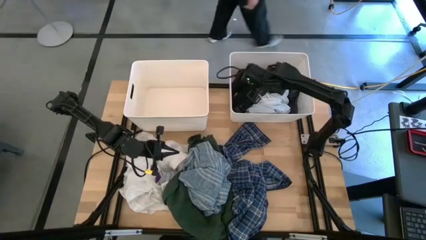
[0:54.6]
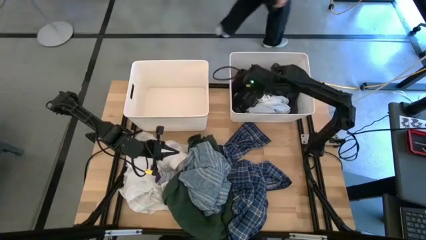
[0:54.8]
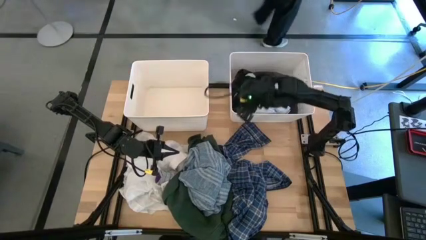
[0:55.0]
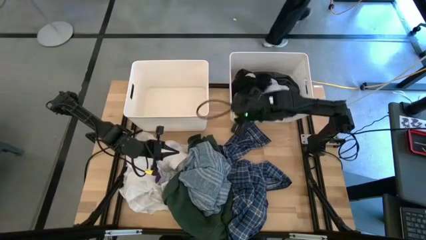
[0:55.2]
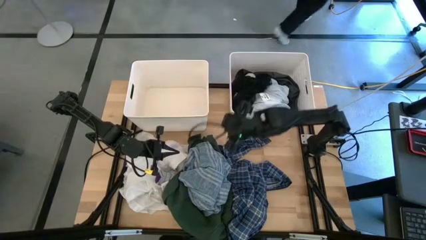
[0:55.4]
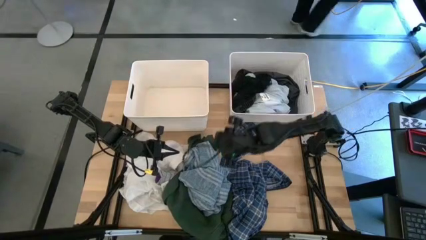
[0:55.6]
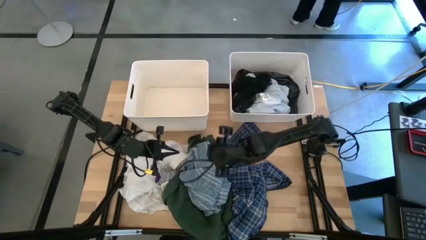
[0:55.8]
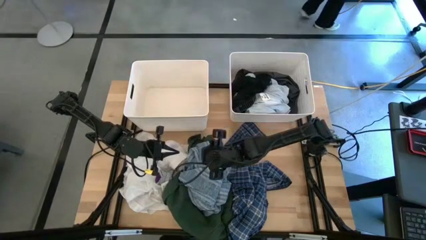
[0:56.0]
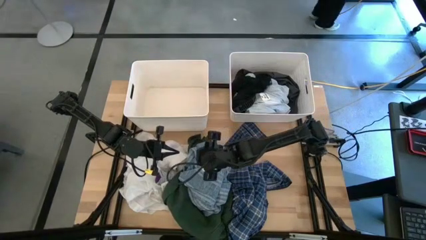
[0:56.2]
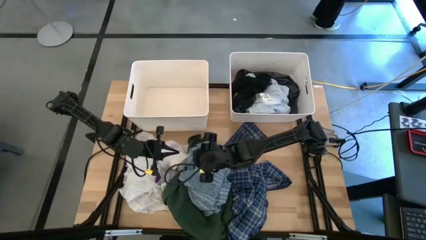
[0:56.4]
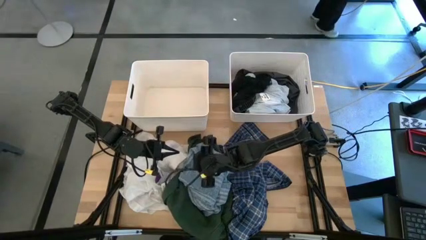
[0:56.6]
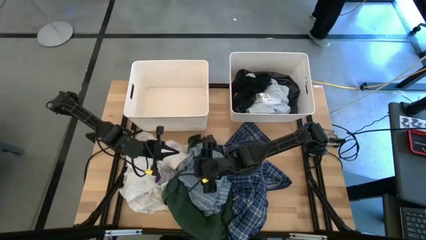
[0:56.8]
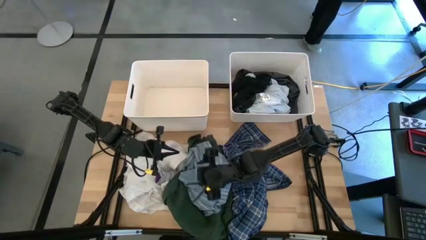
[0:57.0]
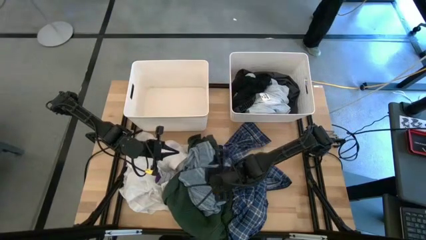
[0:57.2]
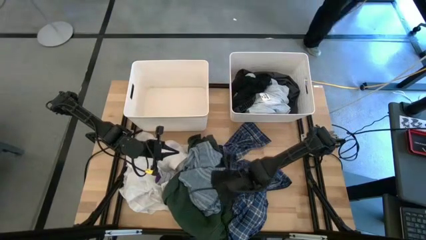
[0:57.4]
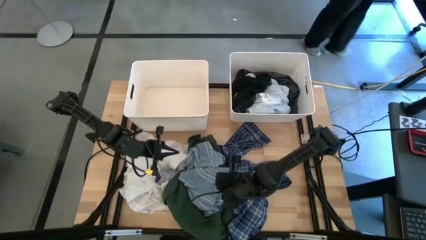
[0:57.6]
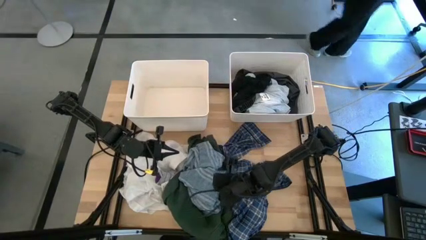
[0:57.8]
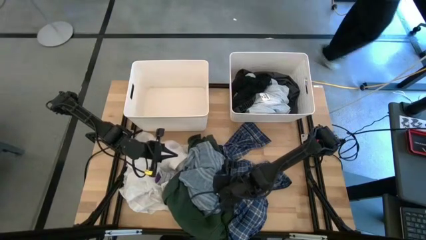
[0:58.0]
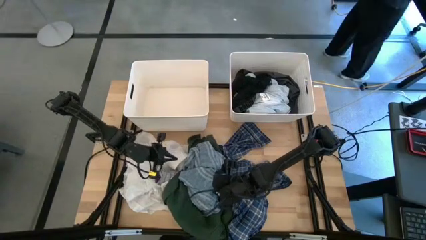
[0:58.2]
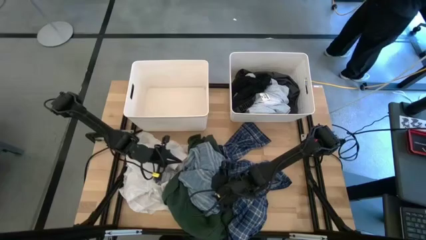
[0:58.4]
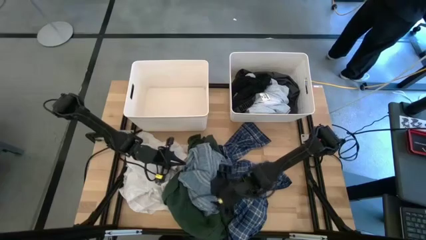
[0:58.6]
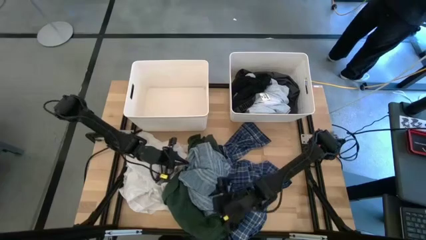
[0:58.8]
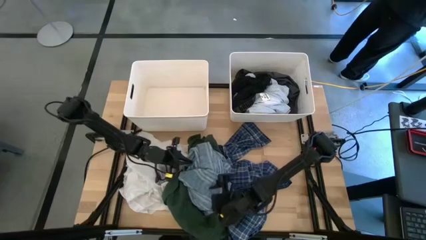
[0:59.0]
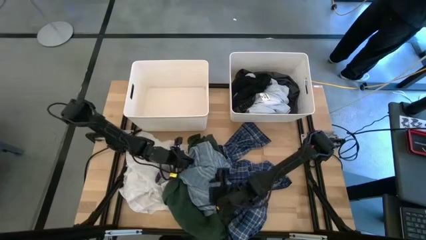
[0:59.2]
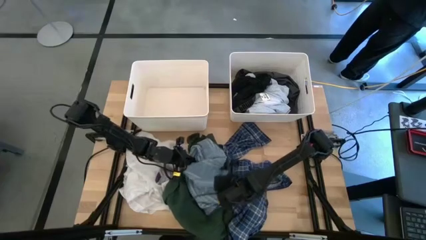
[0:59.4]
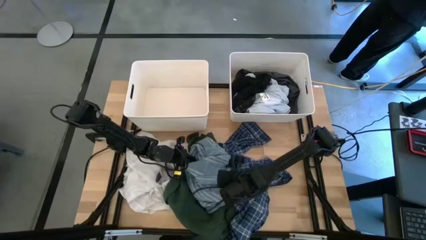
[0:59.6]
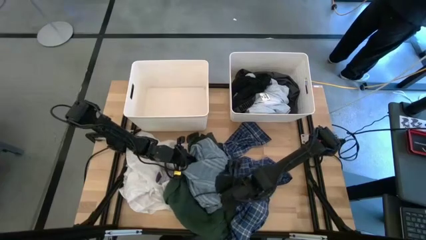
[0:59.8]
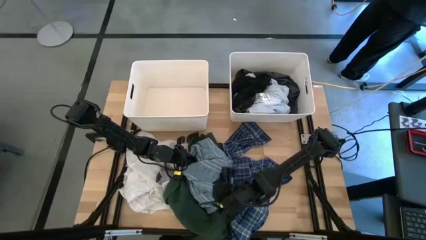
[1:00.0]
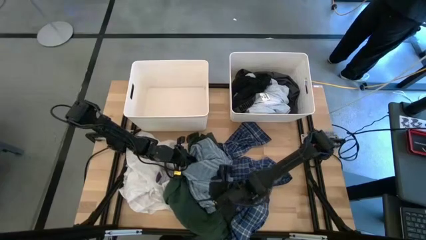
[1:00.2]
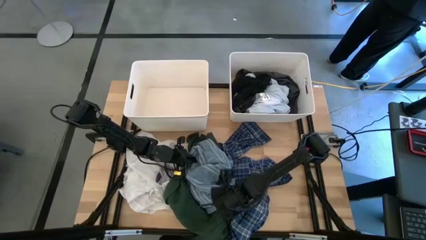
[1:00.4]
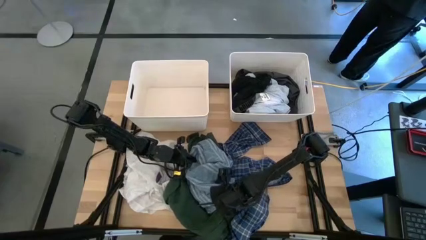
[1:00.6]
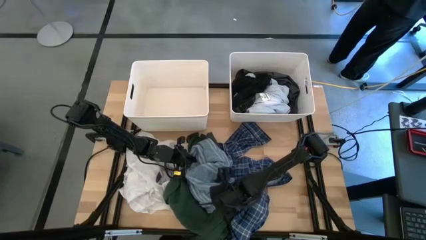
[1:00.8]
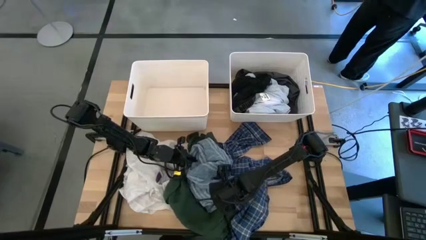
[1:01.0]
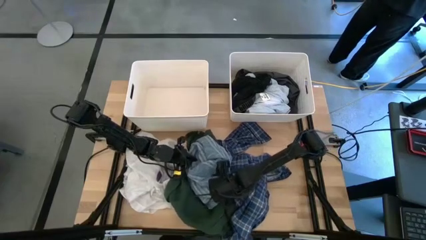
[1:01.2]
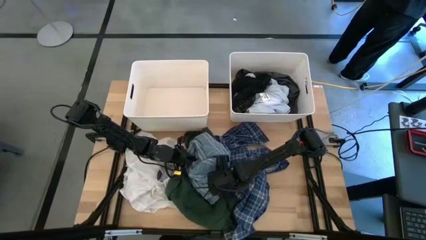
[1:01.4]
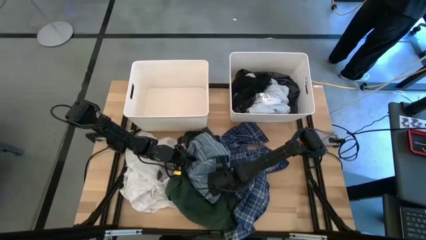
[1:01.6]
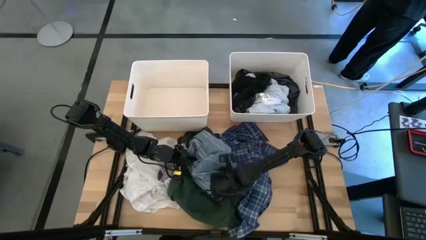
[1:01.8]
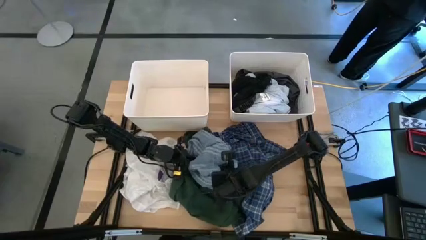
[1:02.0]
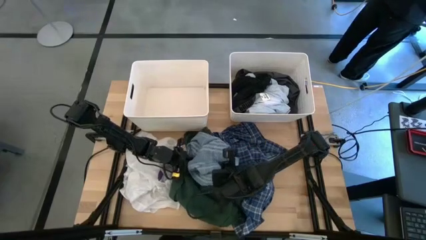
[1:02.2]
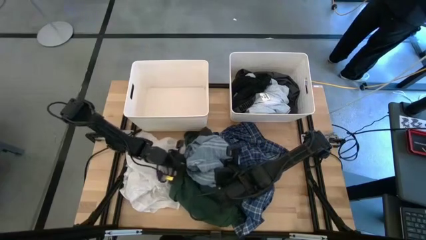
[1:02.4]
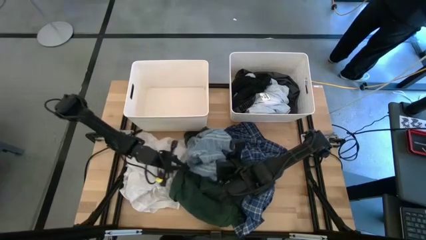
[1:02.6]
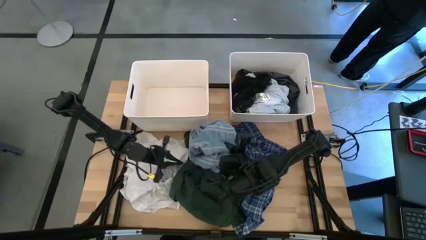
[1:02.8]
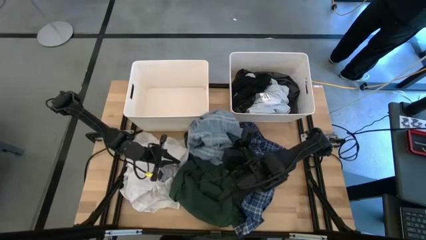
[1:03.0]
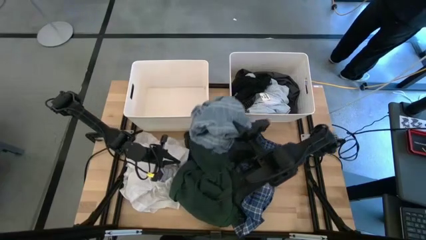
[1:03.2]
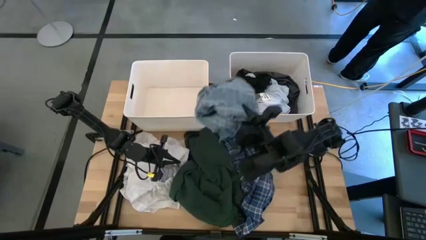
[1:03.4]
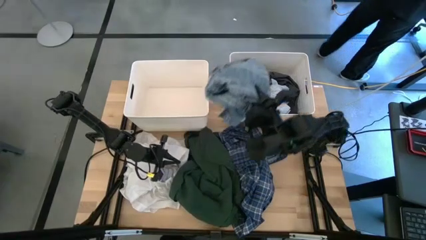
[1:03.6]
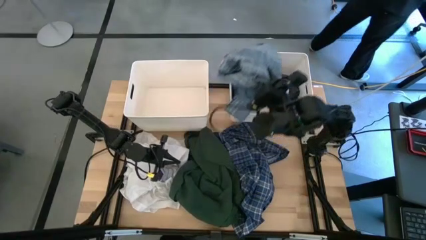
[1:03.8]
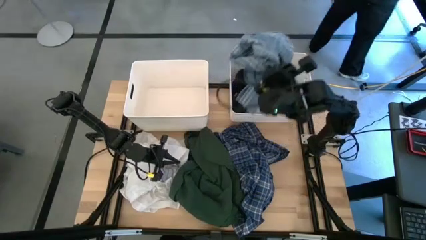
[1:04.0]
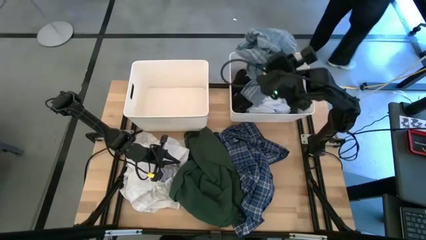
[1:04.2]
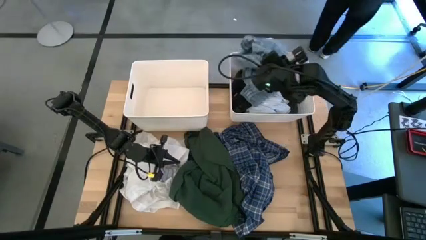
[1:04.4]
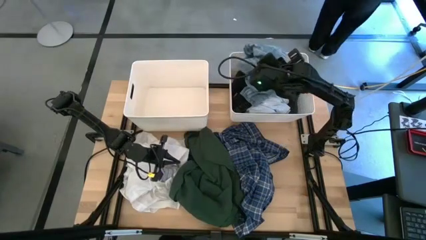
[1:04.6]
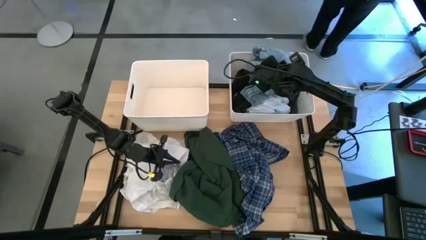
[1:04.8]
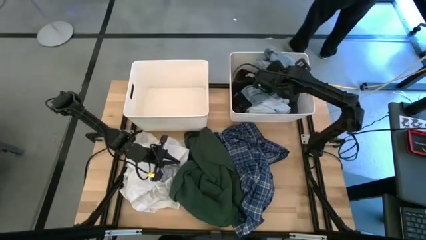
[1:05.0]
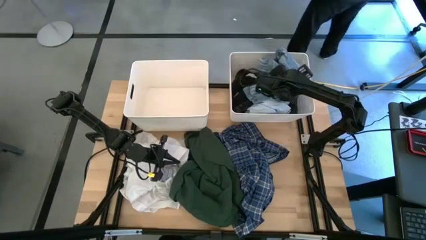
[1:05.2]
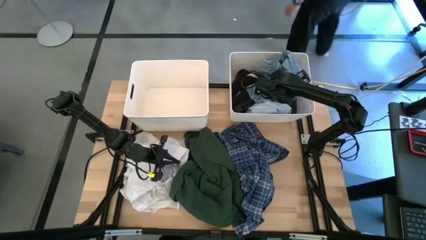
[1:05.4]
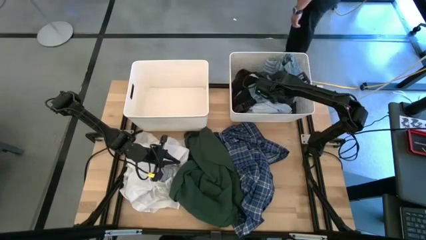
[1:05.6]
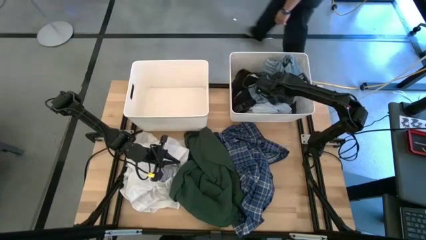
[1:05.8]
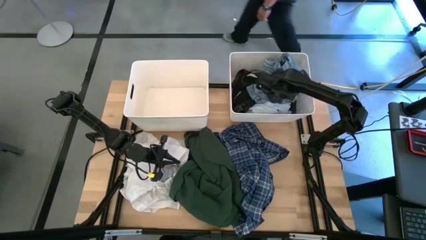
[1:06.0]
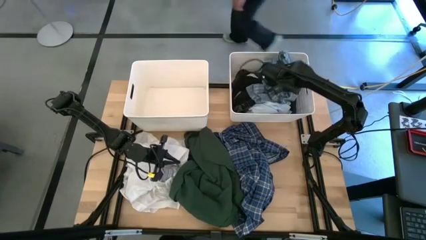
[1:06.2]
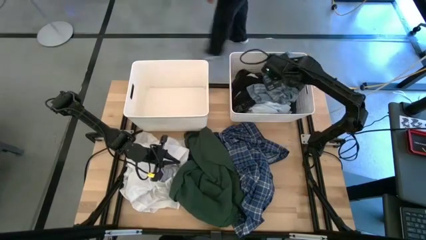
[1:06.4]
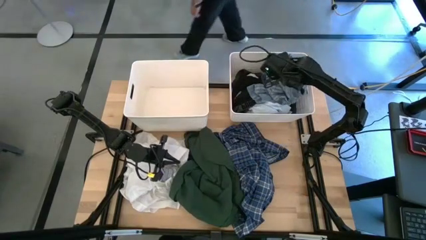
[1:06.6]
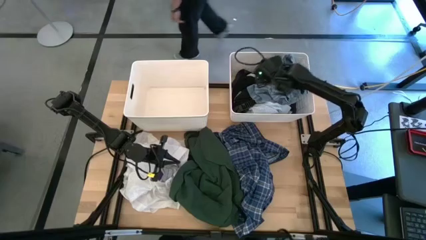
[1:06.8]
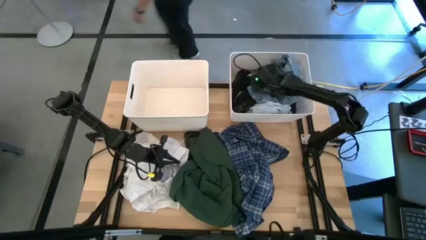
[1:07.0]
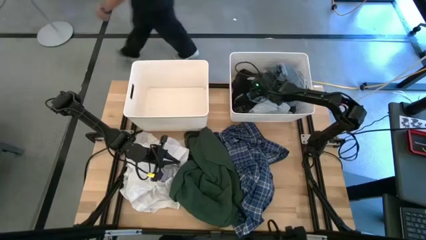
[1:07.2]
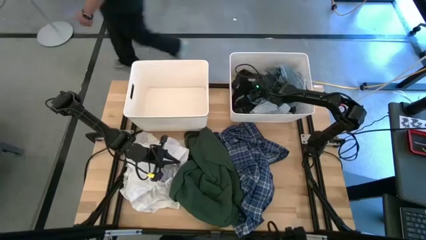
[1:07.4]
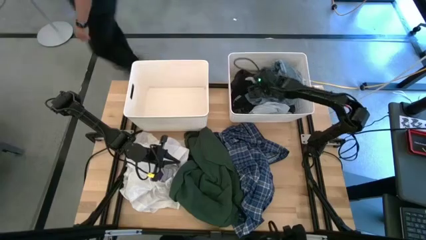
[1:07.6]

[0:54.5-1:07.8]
Task: Sort clothes
Put the light blue patterned pyjama into the right white bin

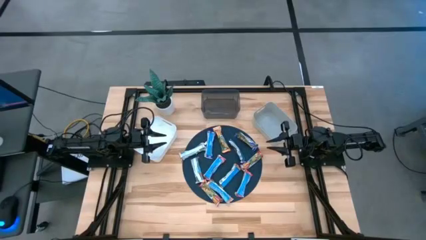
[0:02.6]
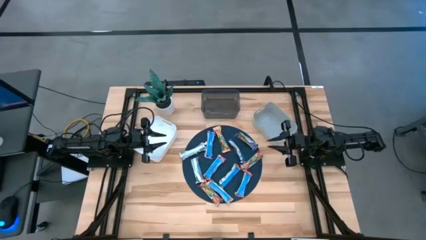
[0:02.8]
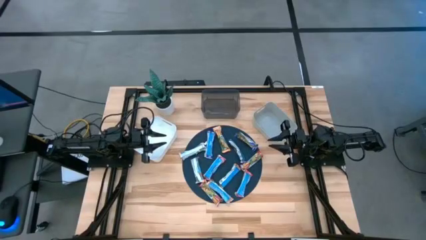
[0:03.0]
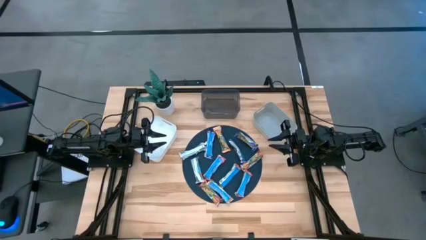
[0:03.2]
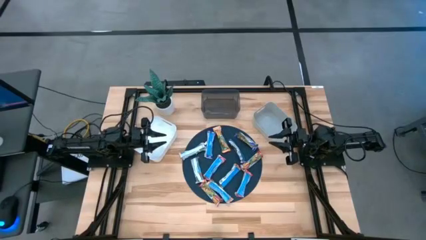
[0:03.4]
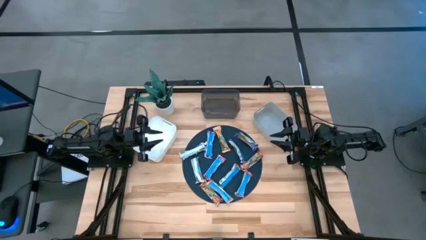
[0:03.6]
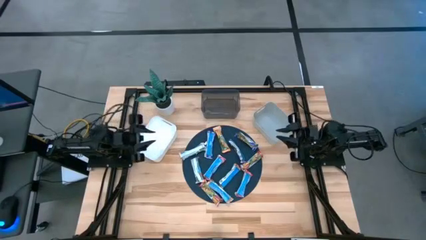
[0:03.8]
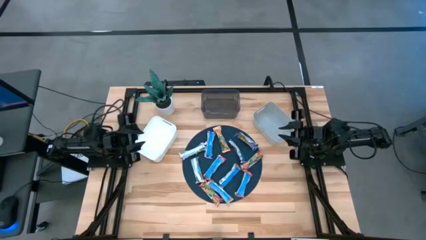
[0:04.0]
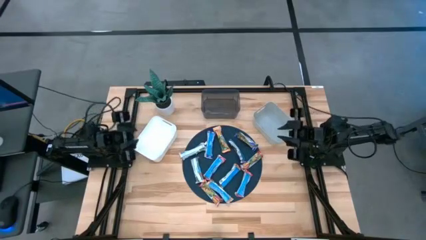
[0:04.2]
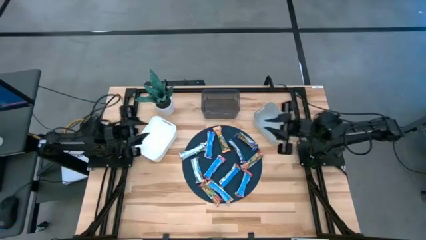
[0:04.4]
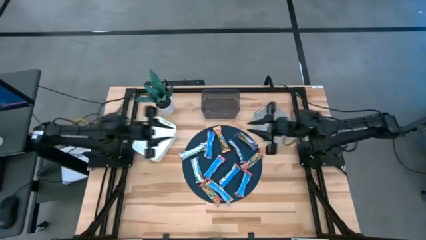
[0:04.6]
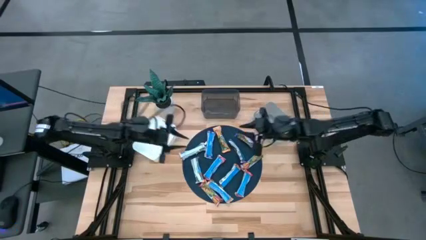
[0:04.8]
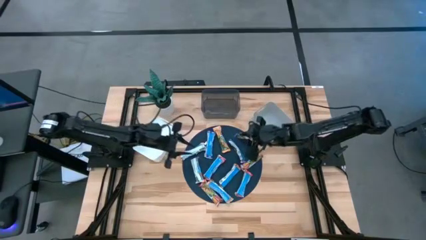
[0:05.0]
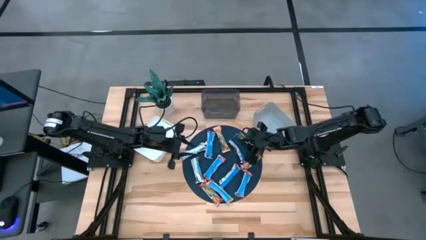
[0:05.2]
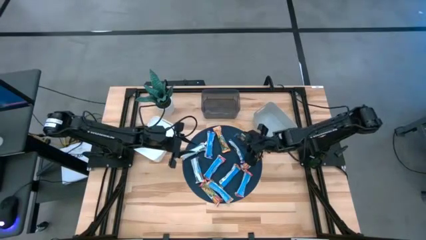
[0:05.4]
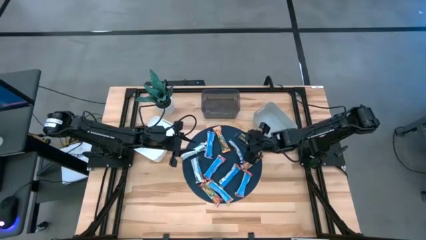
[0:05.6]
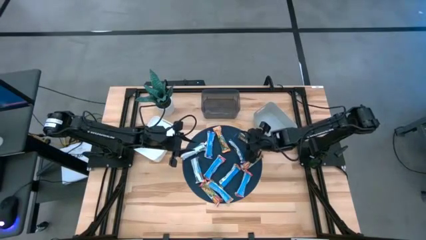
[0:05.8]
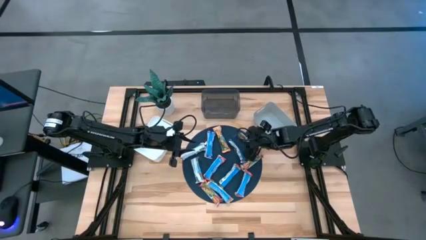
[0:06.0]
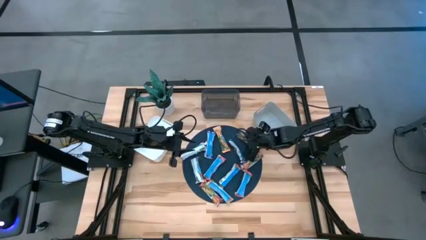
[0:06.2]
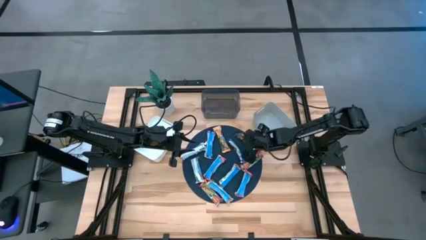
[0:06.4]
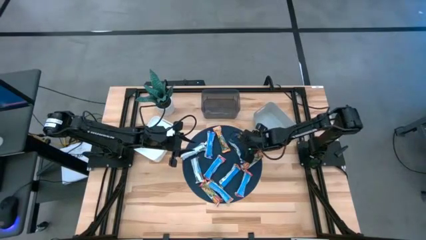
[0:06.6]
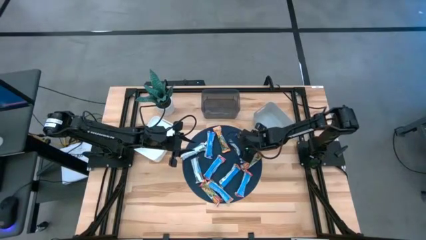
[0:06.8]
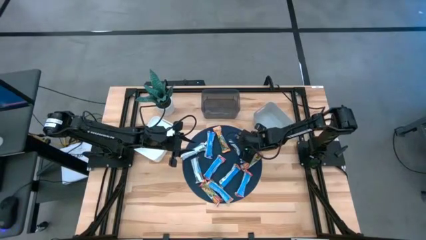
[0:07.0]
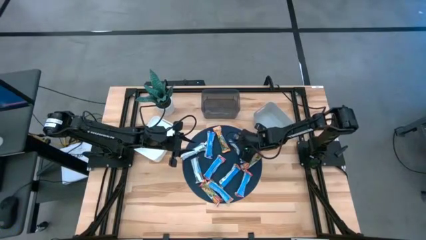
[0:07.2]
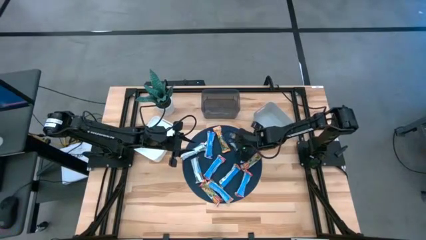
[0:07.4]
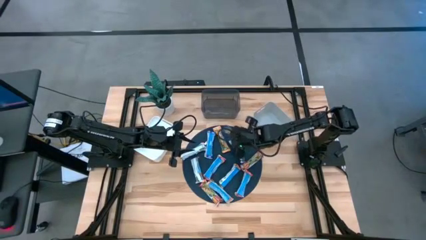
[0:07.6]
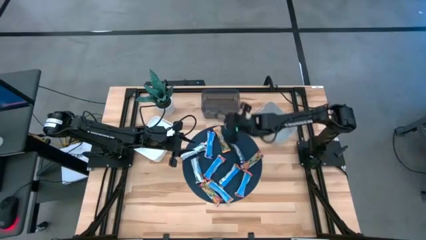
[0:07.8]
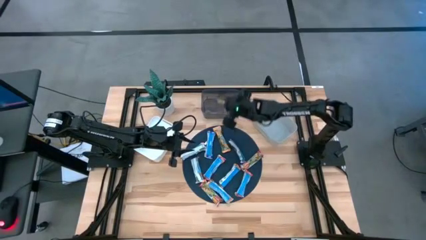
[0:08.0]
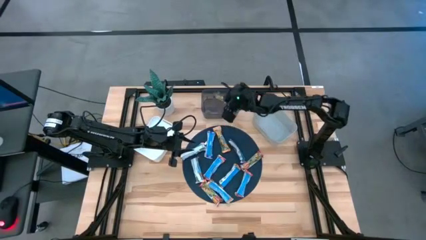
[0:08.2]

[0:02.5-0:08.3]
Task: Pick and place Granola Bars by type
Put the blue granola bar into the black bin
